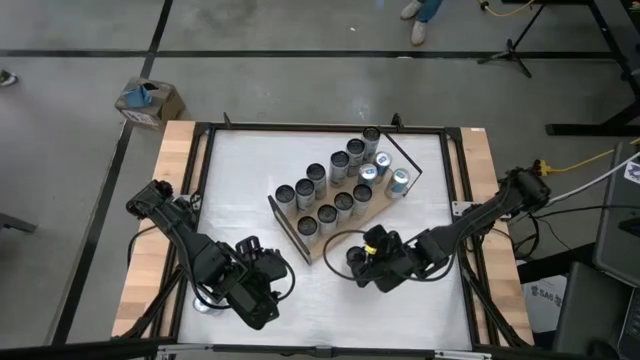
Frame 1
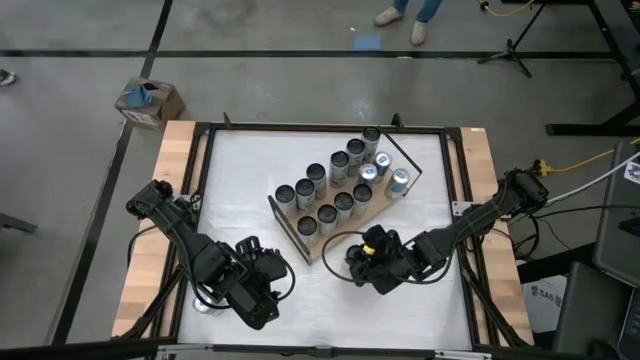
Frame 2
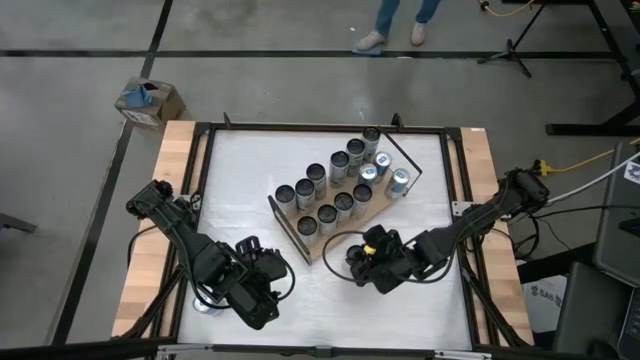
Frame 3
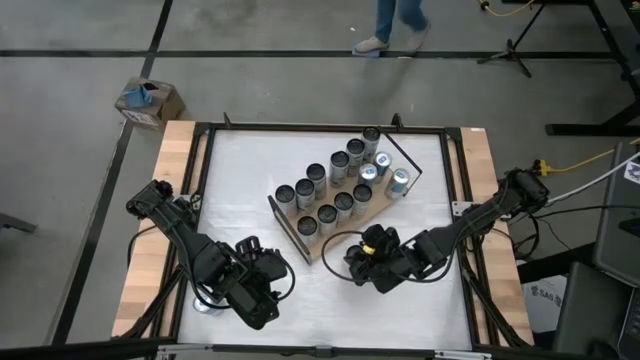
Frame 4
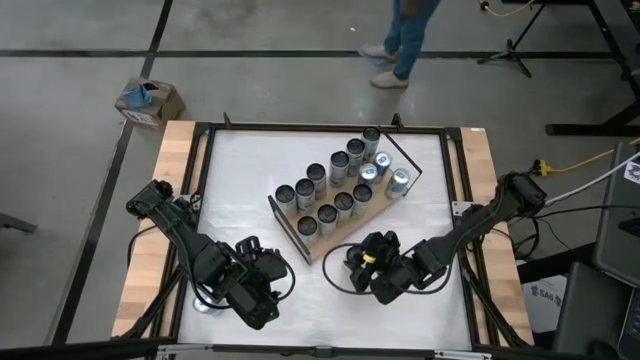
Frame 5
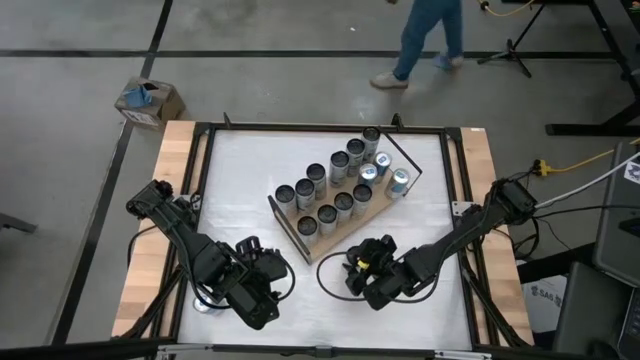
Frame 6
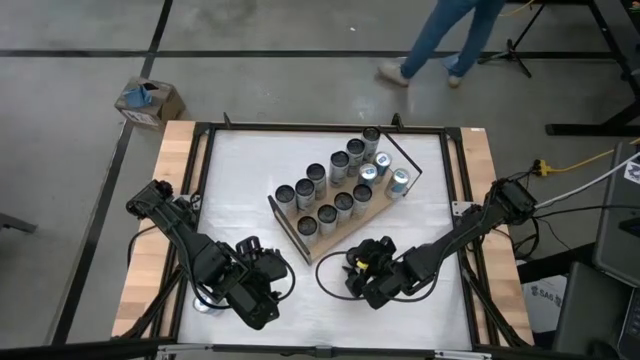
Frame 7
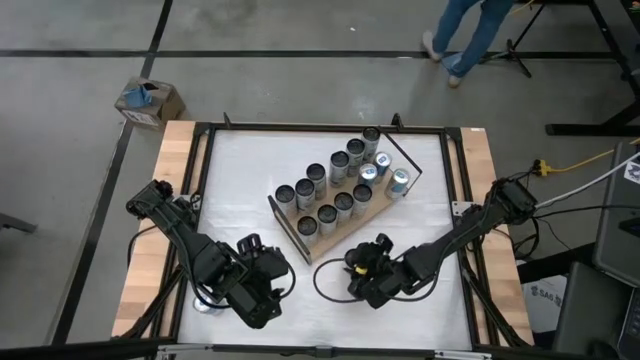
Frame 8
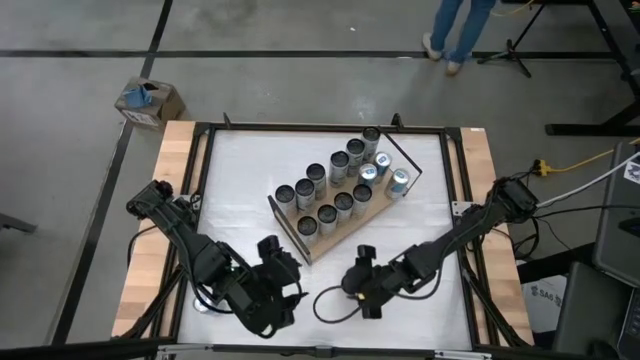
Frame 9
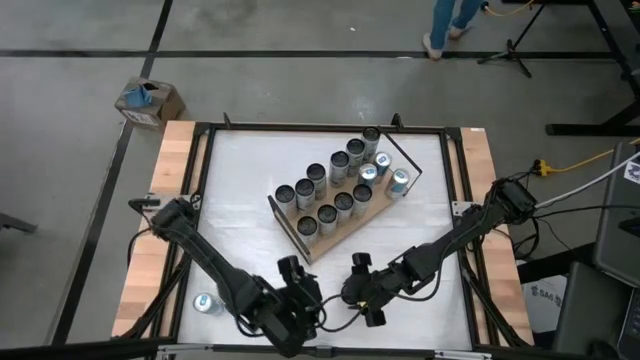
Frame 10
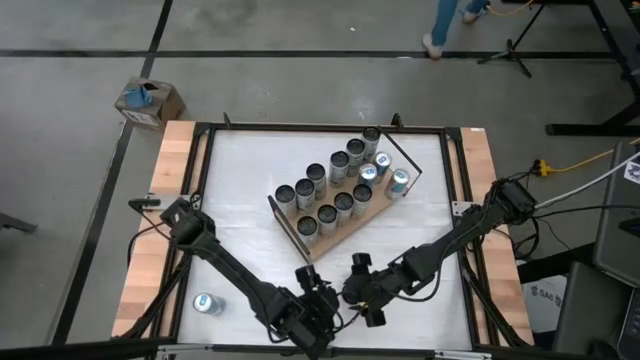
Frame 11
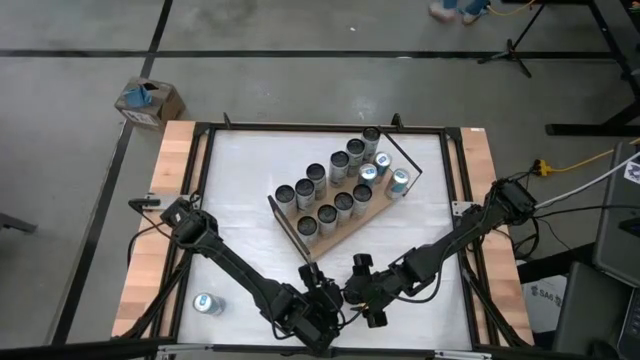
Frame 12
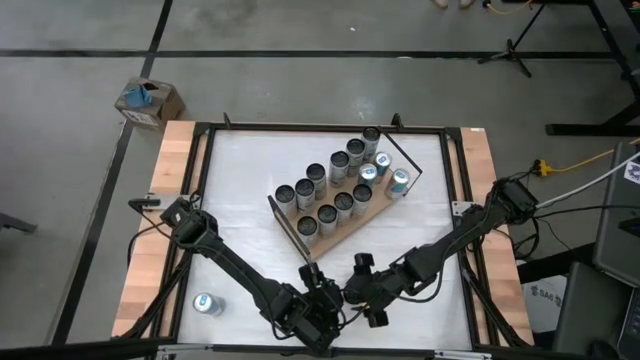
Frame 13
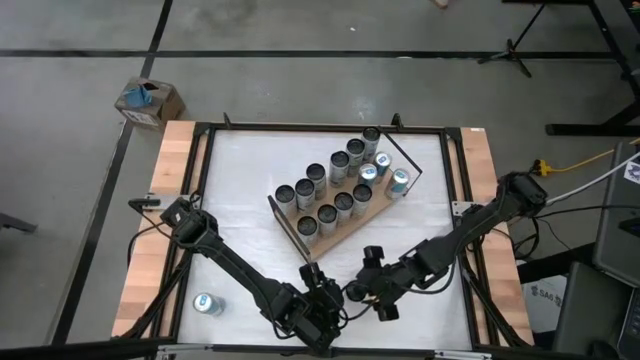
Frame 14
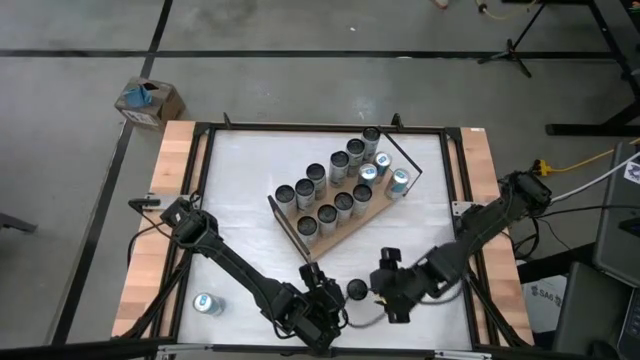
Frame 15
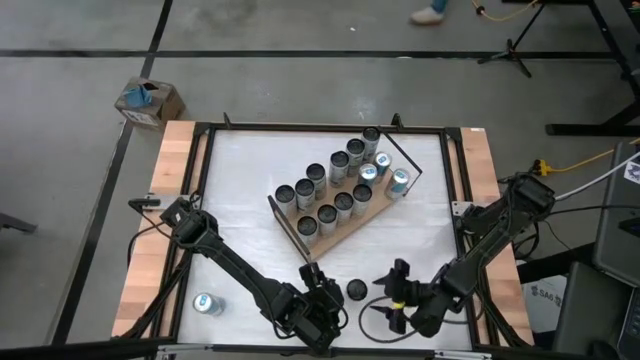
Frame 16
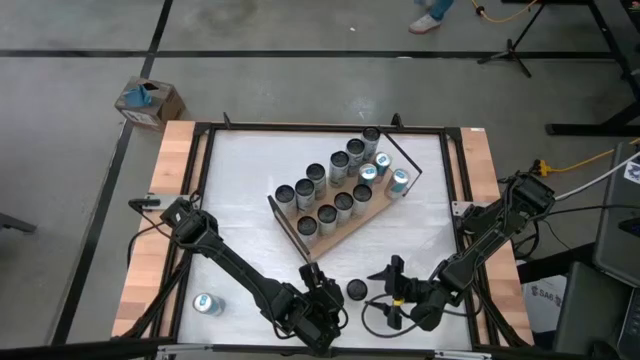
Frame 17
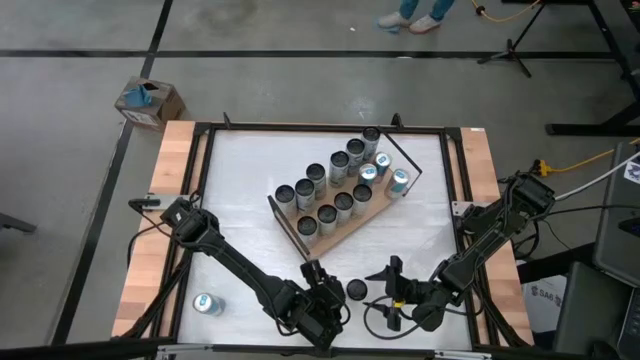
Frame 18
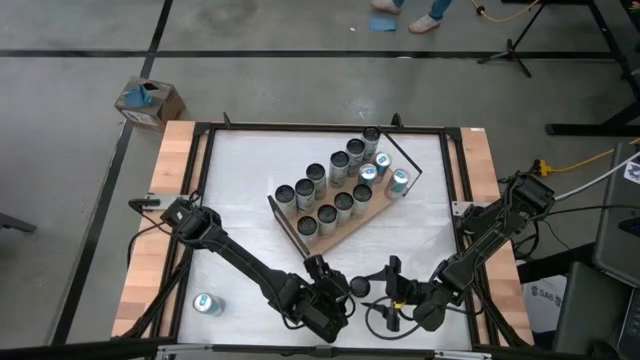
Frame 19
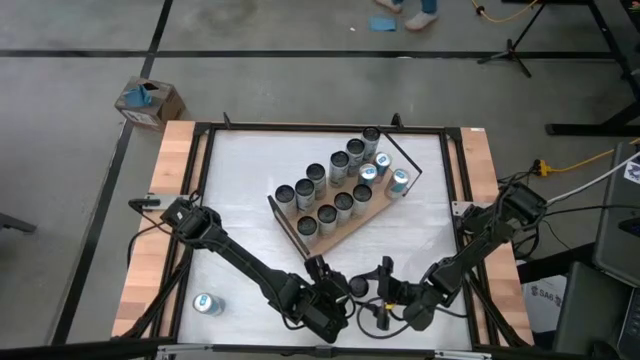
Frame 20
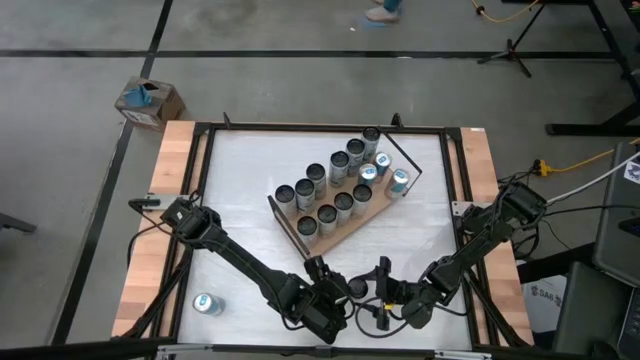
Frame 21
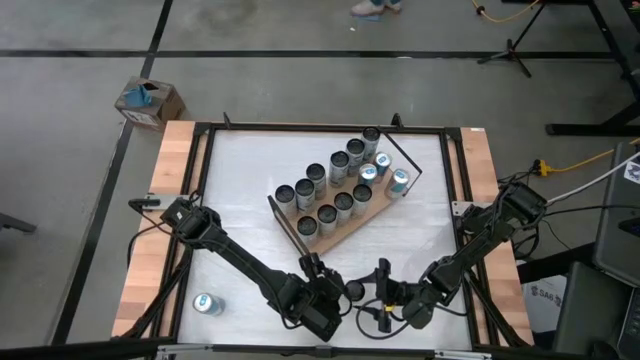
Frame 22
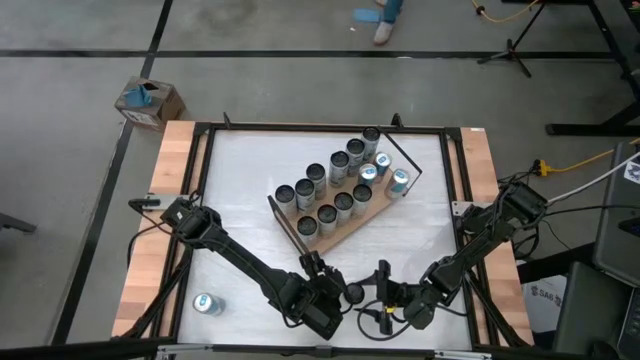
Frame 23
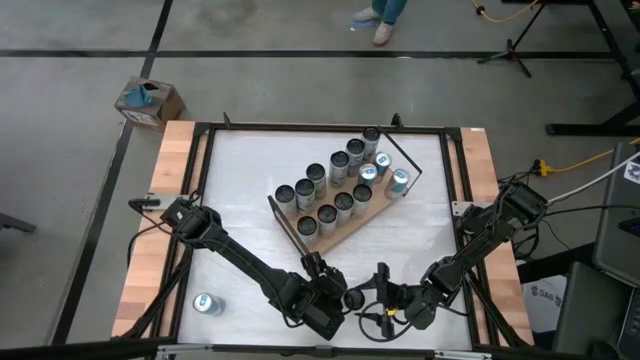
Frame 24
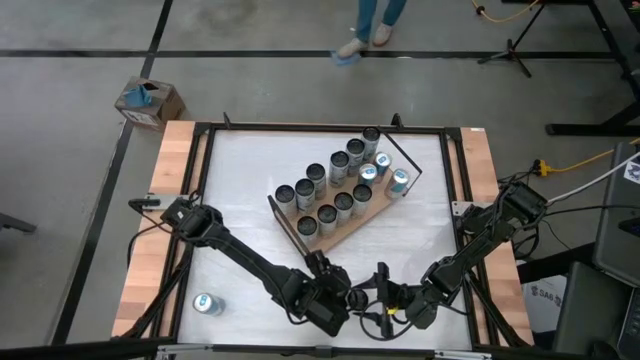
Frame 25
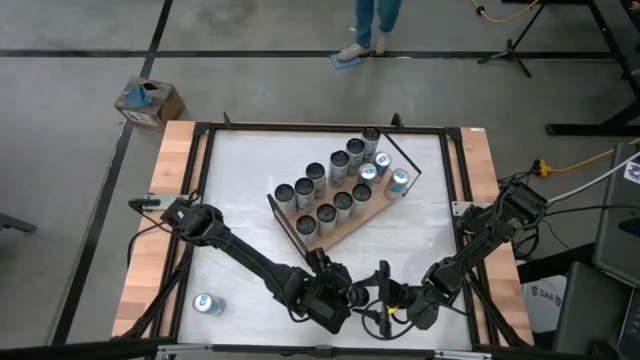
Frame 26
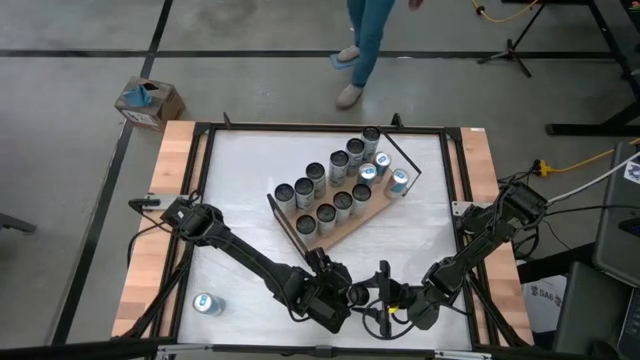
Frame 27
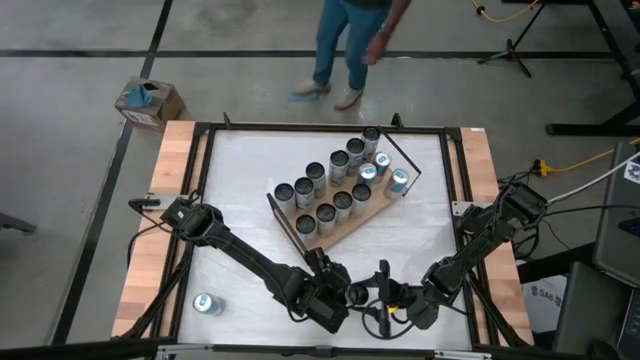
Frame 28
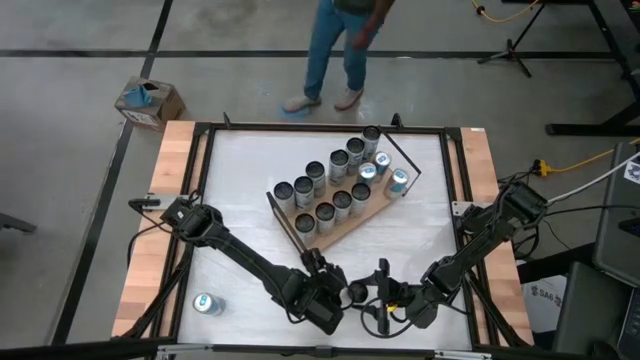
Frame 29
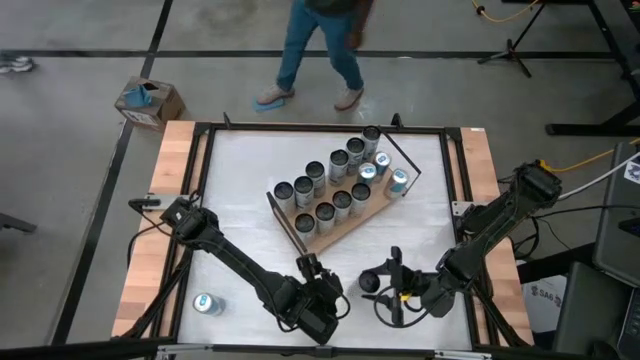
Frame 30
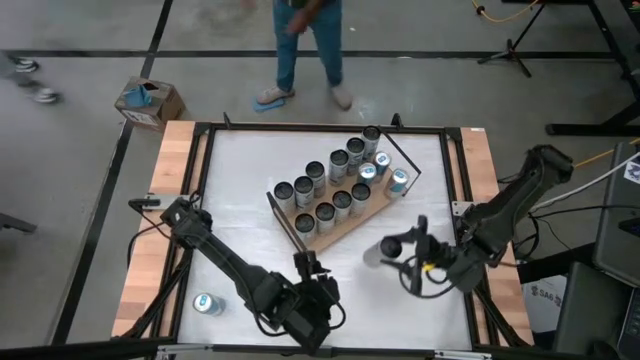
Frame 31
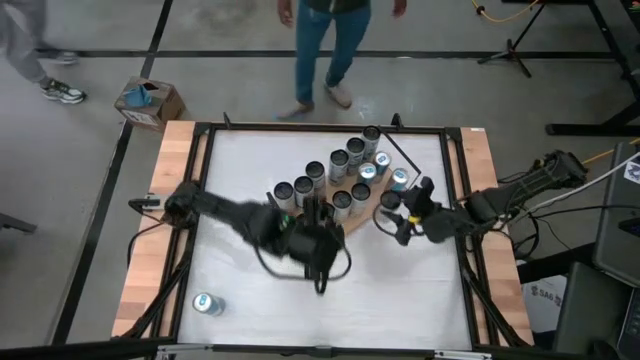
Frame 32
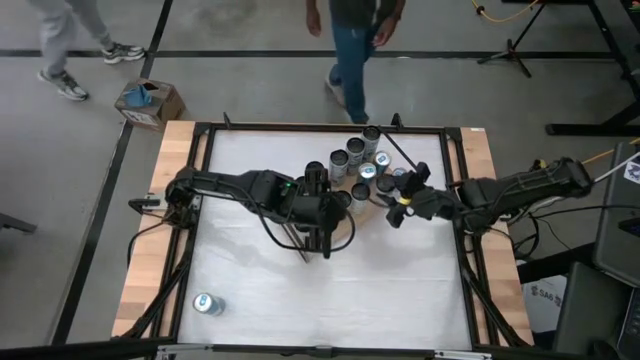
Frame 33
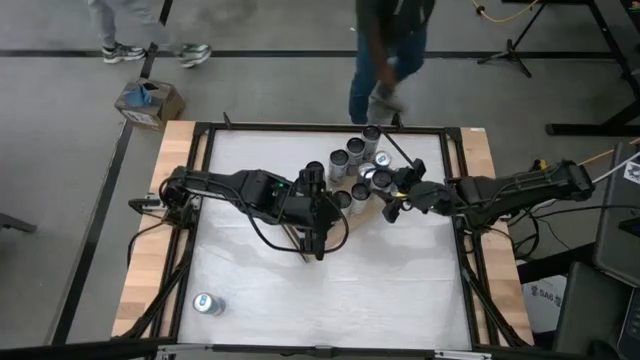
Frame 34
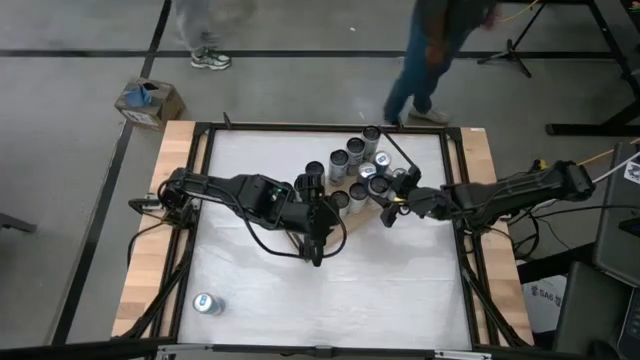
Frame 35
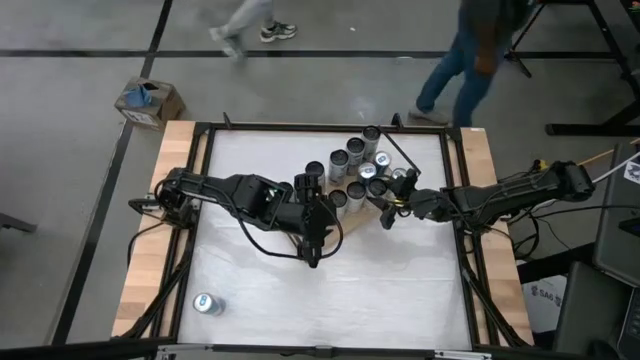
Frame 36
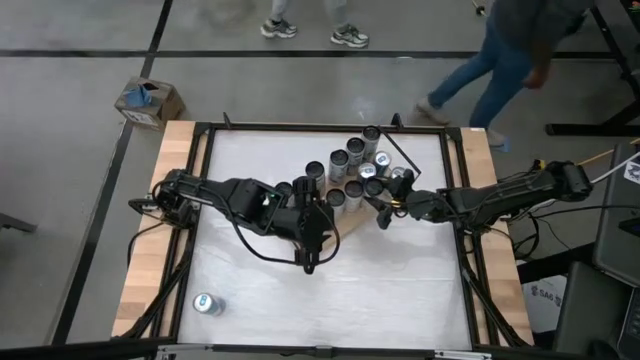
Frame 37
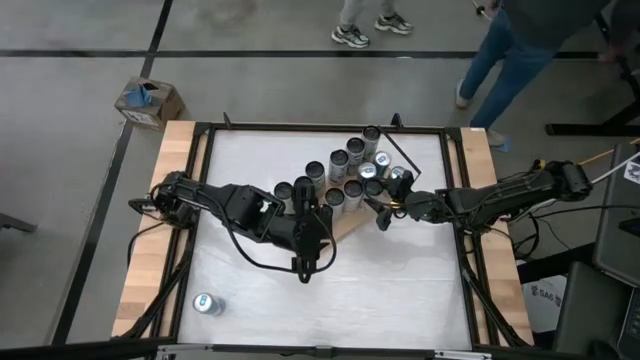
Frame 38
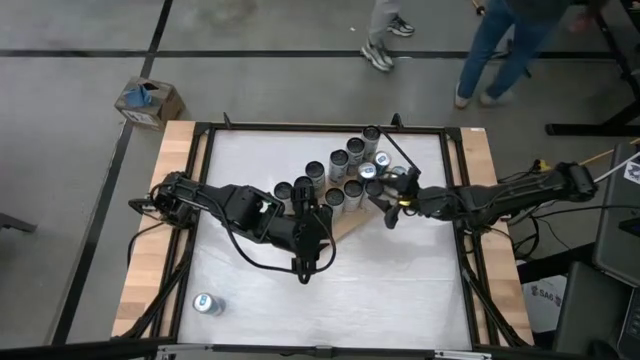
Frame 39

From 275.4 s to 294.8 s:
Task: Place canned beverage on shelf
Put the white yellow soda can on the shelf

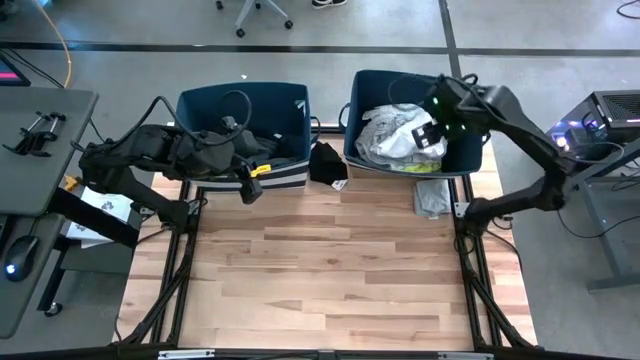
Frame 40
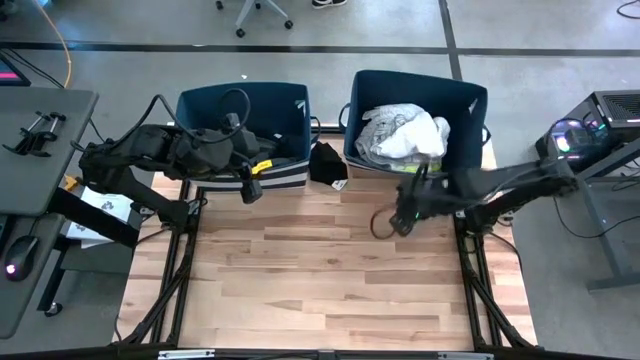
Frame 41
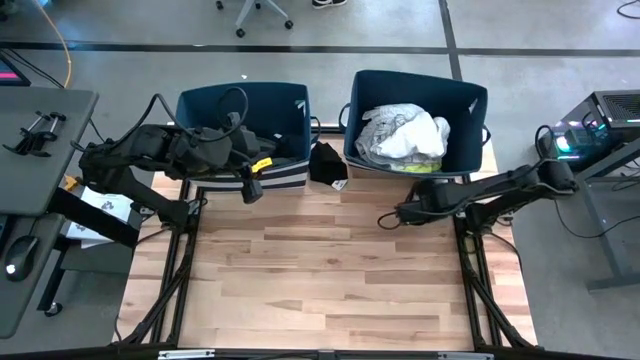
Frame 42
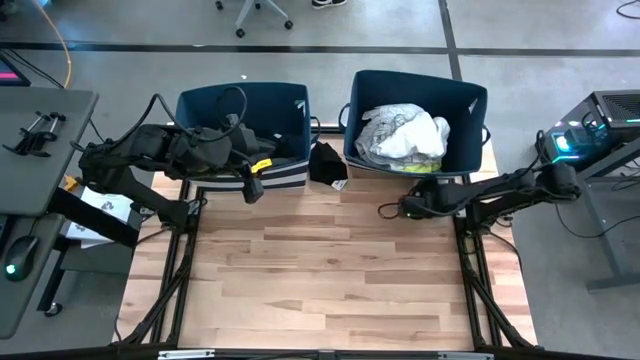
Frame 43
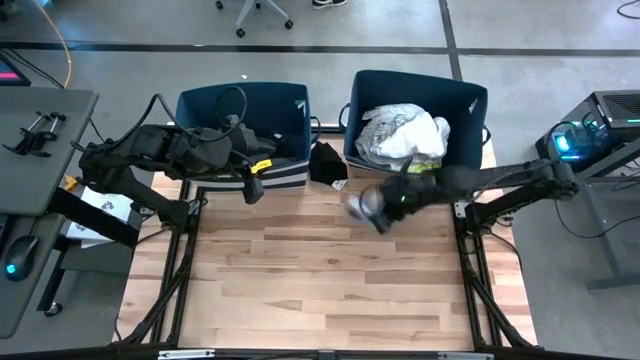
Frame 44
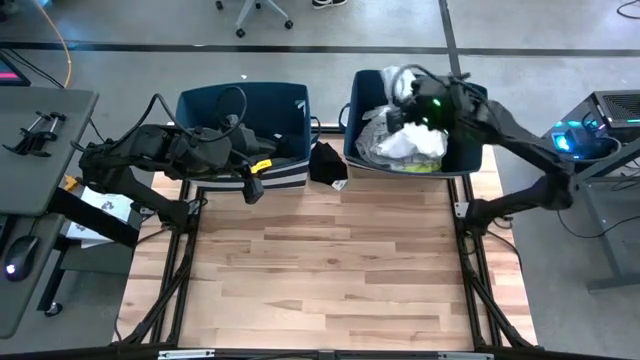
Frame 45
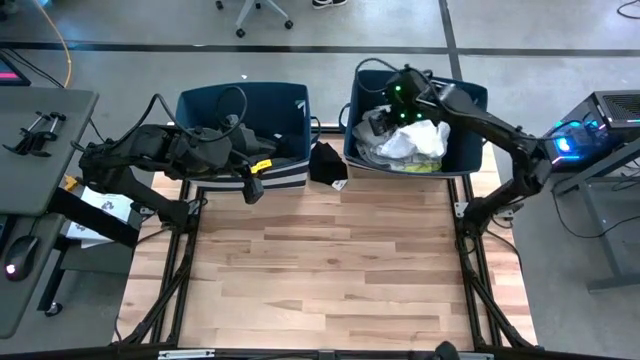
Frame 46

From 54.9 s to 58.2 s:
Task: Sort clothes
Put the gray underwear into the right laundry bin
